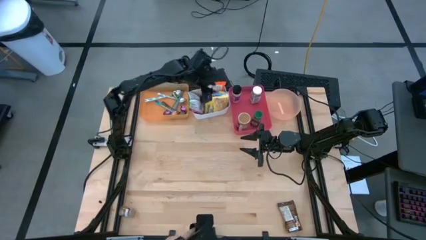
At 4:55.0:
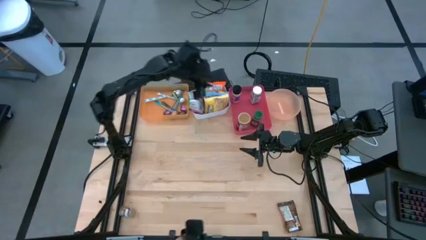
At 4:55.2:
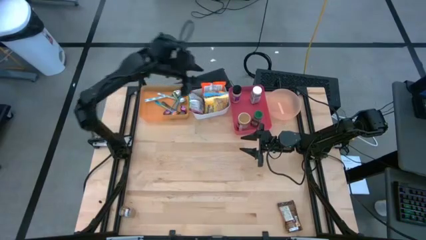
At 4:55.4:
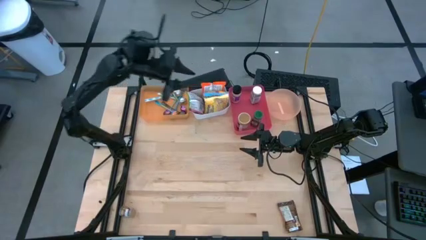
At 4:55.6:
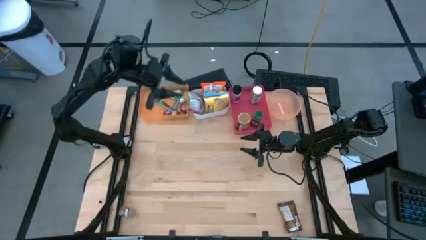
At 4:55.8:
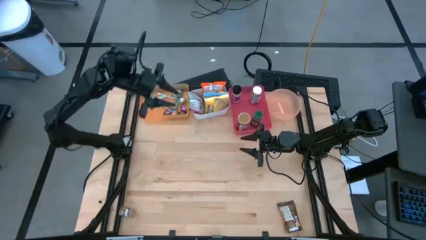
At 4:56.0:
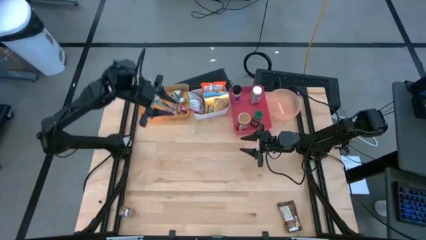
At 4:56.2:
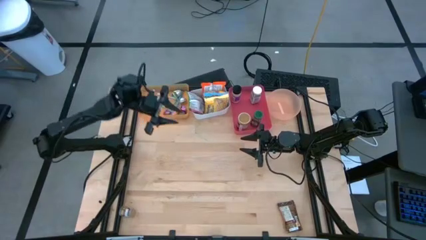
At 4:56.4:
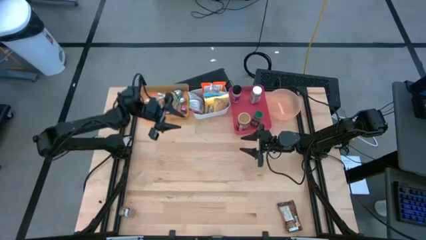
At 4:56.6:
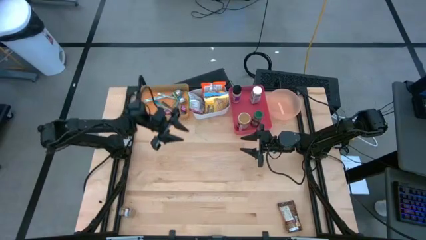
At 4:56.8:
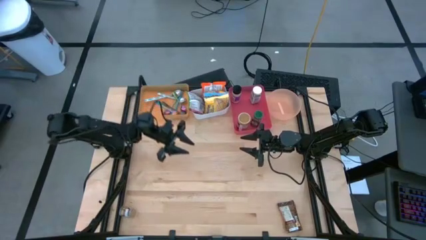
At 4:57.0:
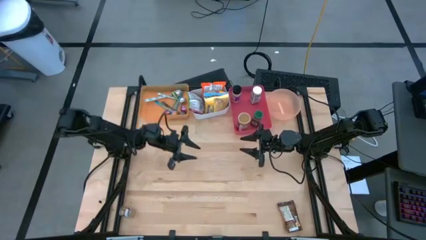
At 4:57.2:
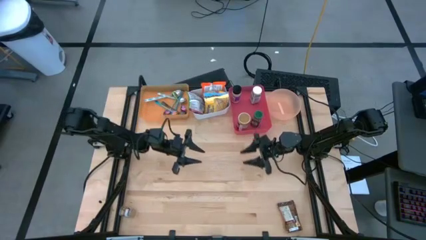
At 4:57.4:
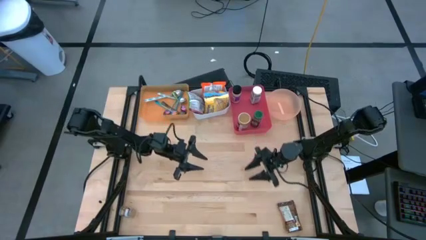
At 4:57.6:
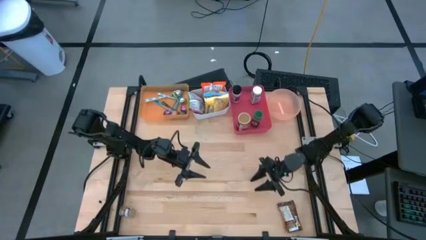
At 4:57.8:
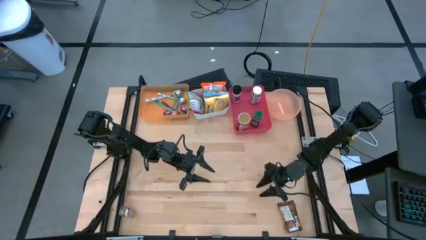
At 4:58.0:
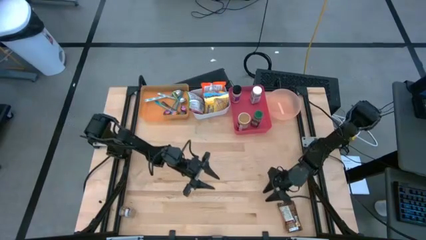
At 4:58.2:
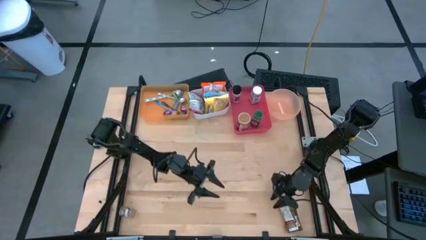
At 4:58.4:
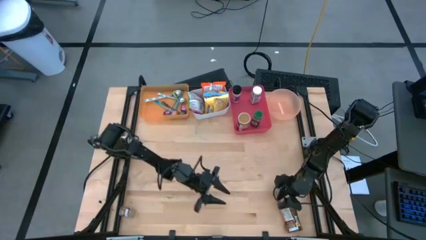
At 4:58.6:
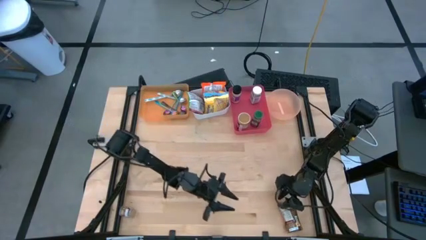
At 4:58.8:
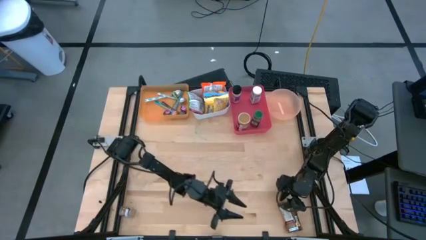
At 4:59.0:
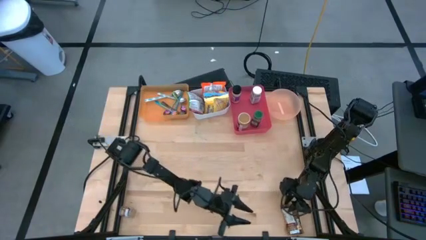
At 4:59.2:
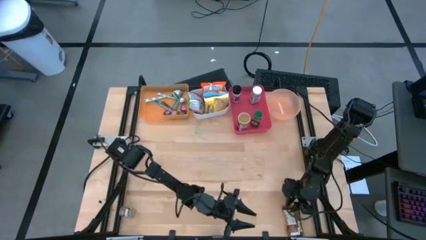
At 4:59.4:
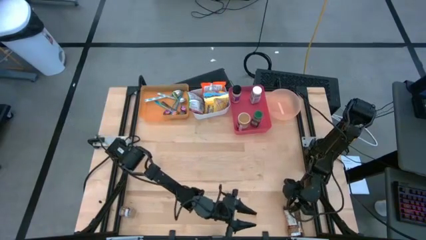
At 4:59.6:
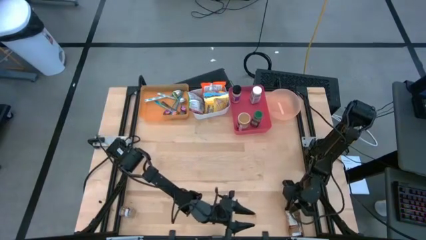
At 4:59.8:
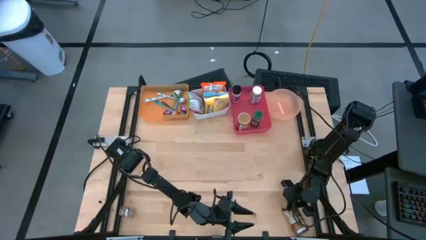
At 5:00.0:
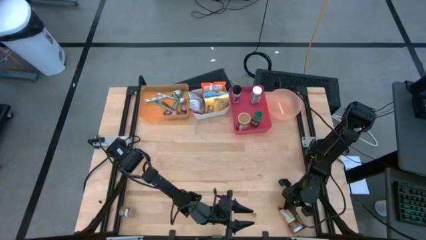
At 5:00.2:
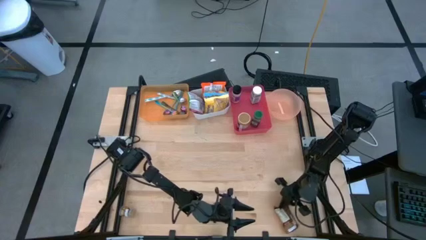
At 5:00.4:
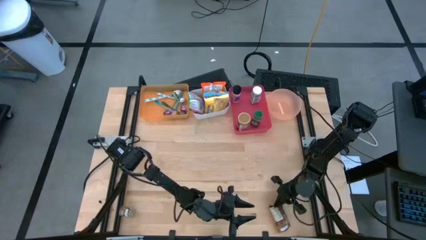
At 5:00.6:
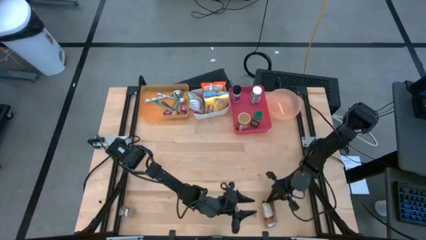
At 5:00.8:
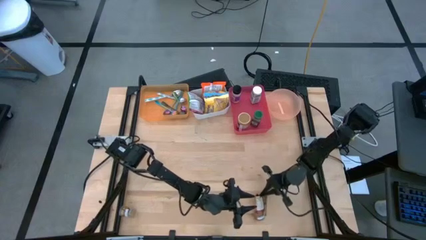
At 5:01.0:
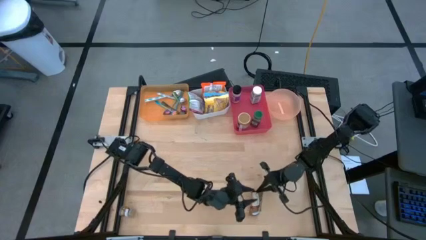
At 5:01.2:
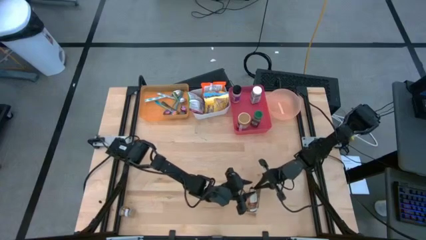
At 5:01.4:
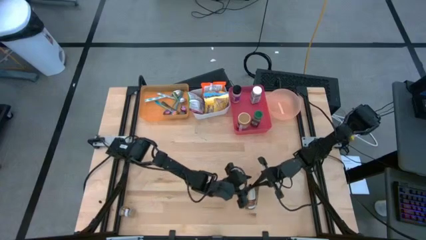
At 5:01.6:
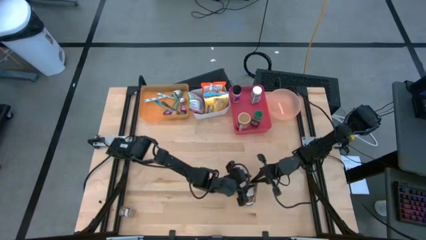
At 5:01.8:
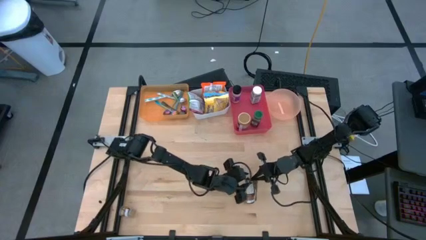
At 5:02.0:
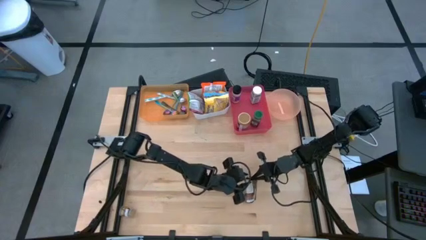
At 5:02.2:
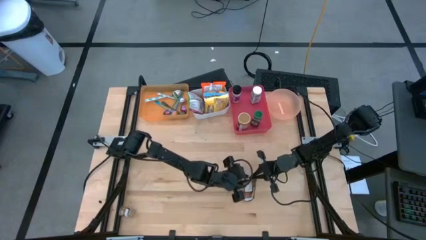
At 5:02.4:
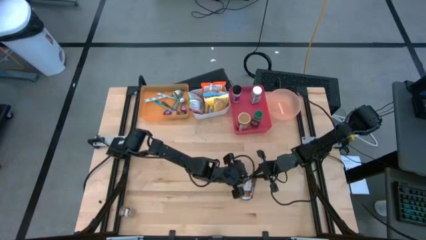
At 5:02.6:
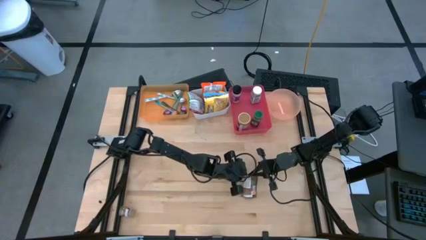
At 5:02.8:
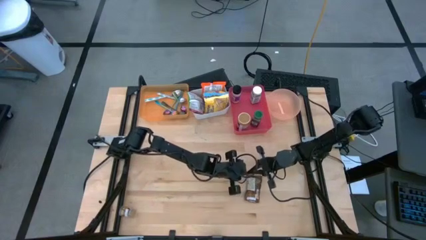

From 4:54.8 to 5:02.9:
Task: Pick & Place Food Item
Put the orange seasoning packet into the pink bin

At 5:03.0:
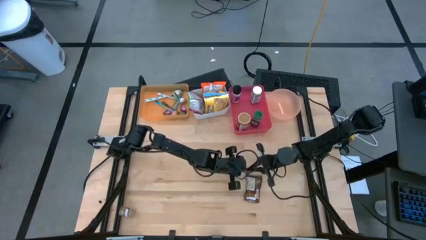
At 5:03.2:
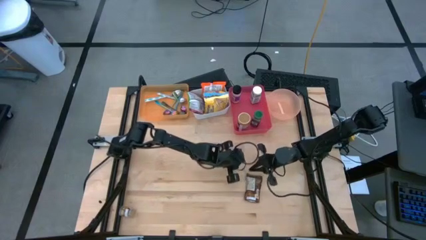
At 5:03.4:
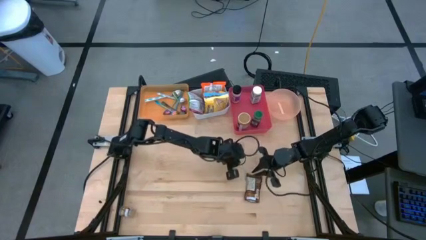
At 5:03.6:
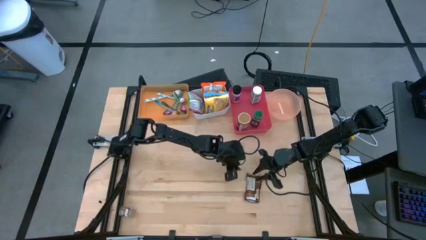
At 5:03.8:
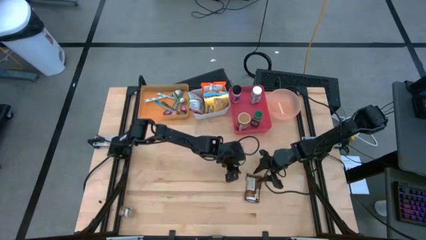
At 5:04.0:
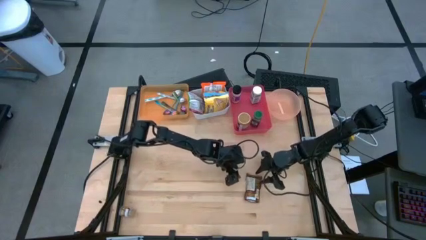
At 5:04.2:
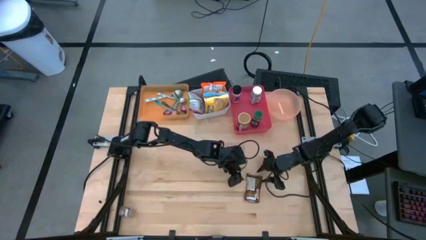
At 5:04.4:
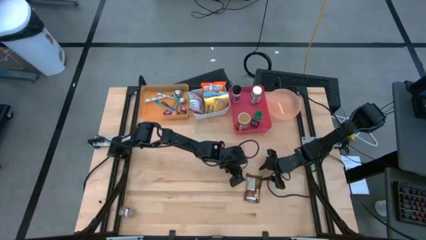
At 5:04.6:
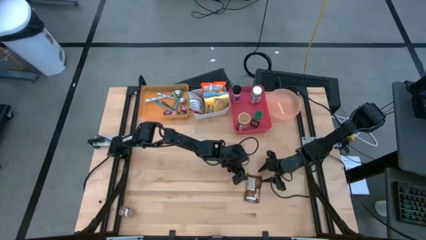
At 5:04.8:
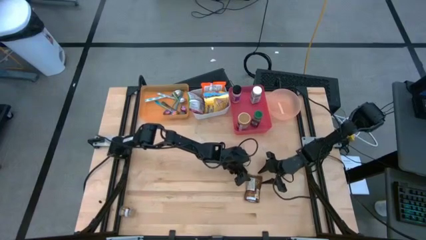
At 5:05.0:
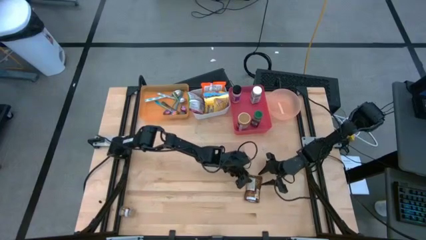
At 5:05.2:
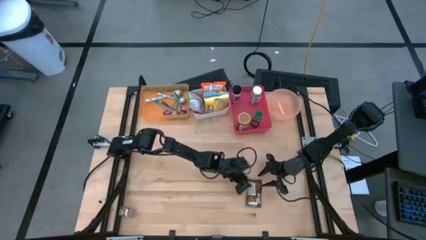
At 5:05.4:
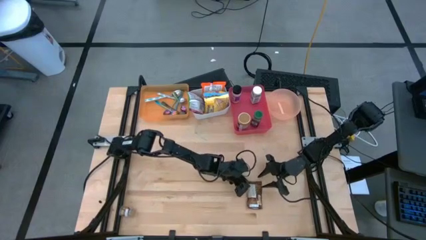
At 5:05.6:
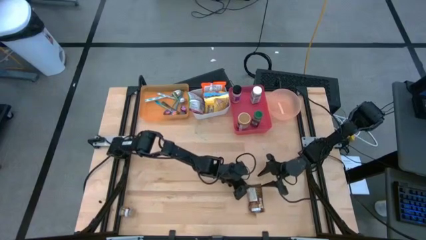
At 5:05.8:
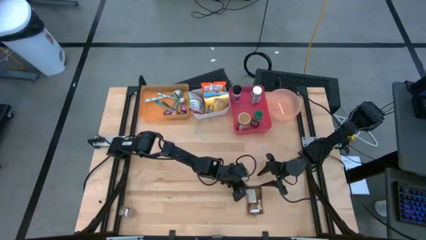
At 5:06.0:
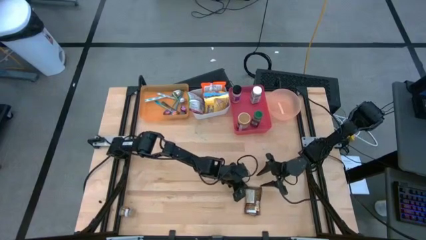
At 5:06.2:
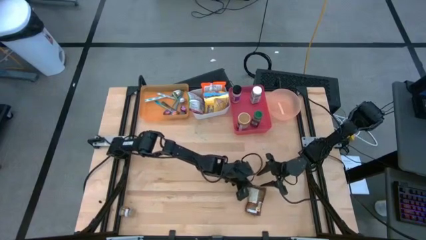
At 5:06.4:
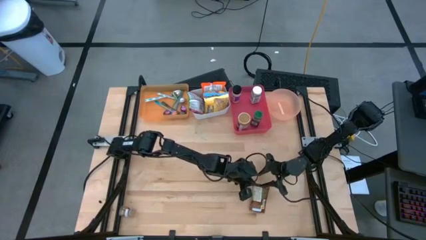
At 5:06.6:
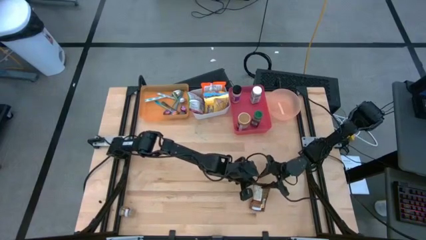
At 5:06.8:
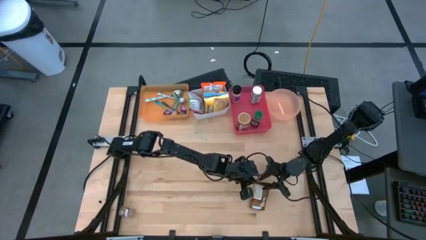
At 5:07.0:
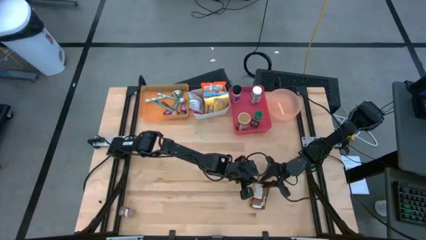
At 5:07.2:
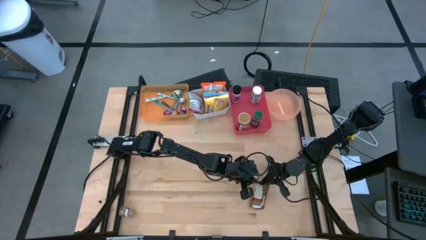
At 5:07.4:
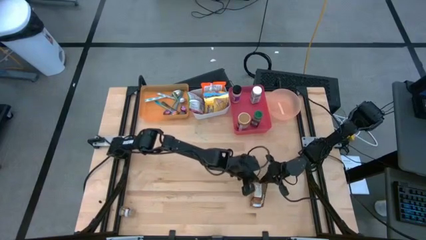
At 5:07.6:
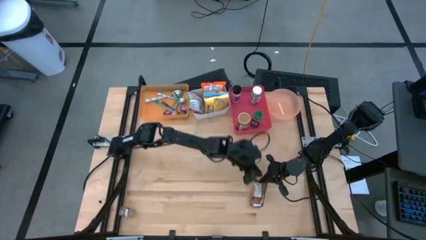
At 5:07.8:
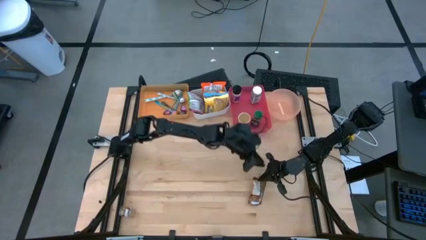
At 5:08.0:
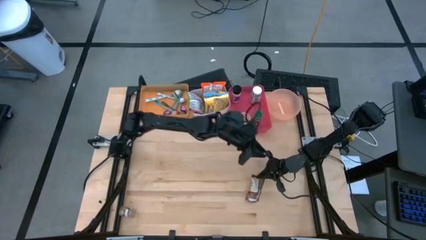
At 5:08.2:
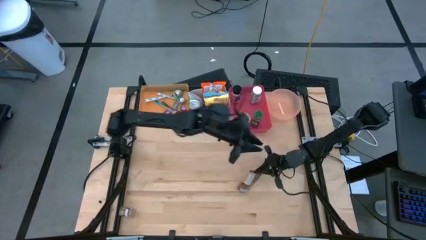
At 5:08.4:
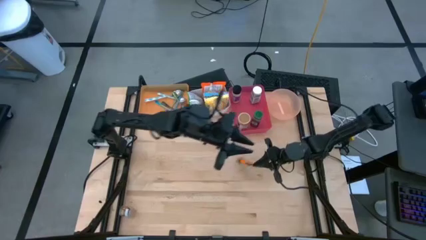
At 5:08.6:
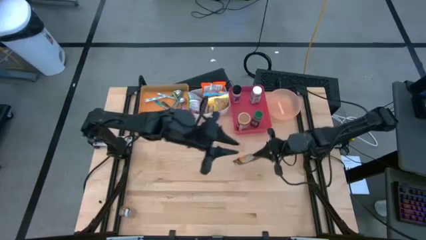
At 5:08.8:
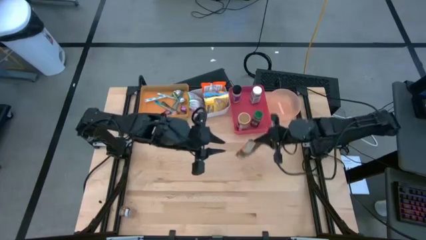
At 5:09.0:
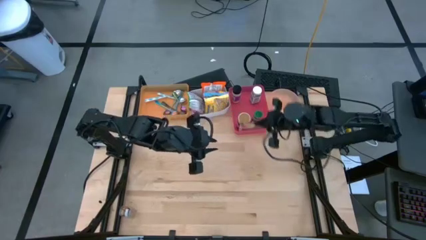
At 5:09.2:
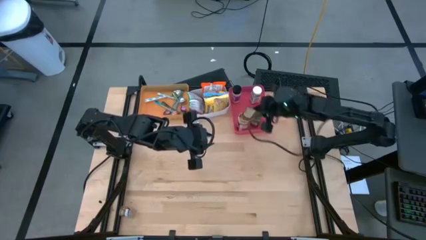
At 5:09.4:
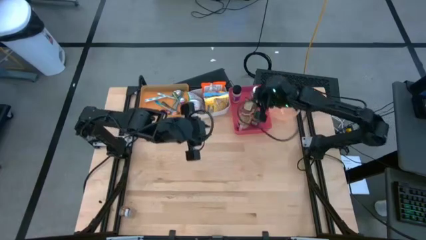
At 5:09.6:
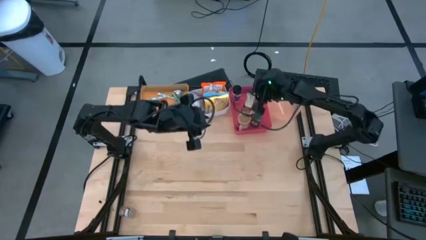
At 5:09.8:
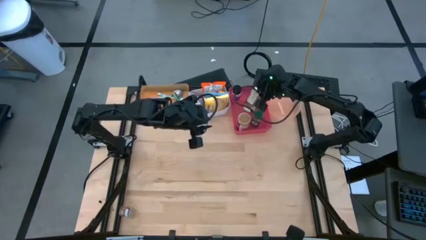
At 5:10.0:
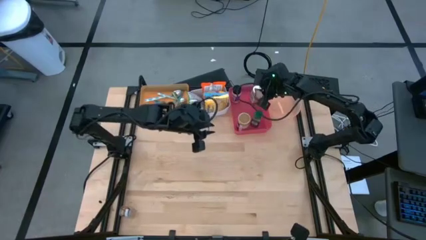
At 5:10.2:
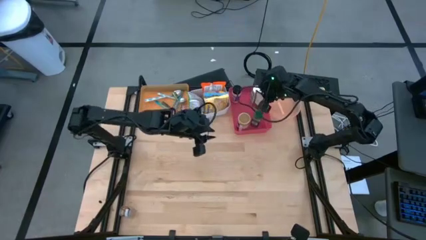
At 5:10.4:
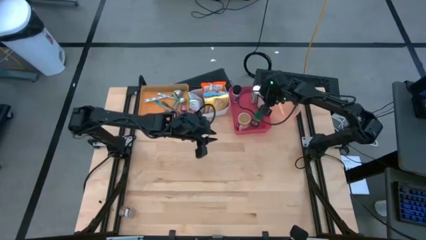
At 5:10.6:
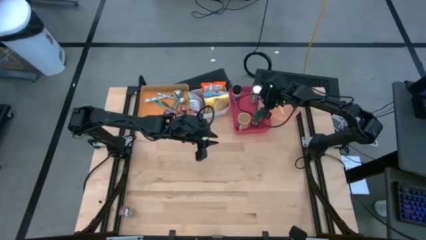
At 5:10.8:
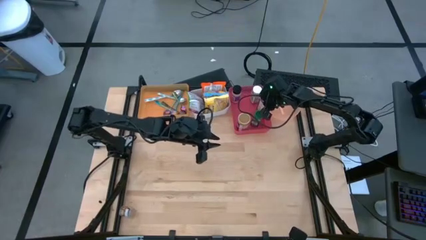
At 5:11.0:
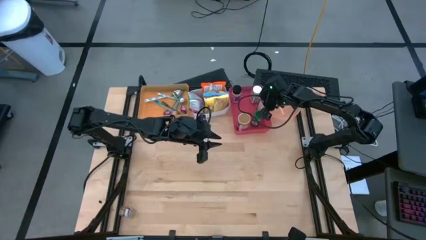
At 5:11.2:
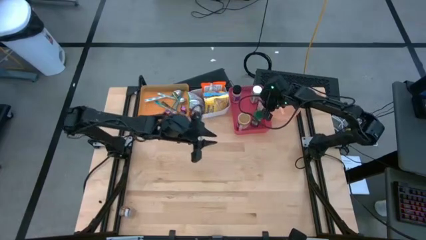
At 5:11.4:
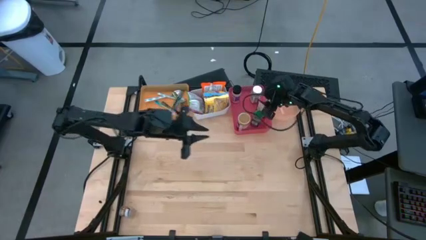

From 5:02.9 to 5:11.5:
Put the orange seasoning packet into the pink bin
